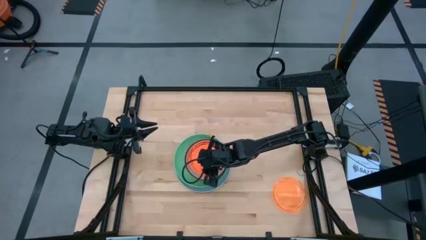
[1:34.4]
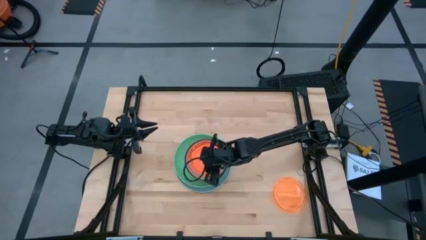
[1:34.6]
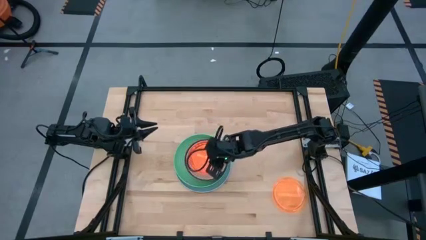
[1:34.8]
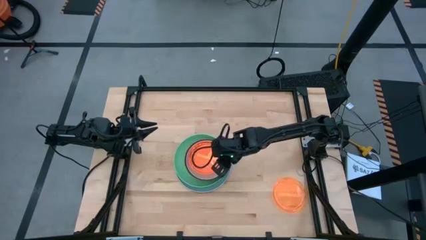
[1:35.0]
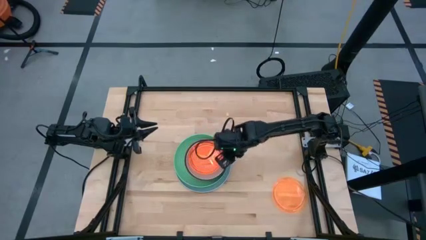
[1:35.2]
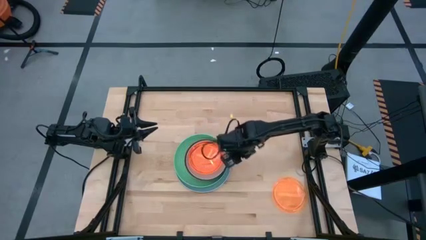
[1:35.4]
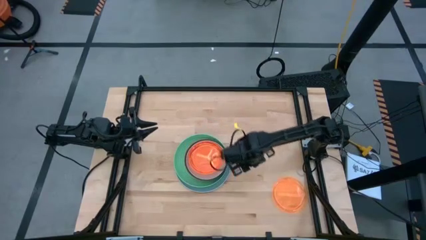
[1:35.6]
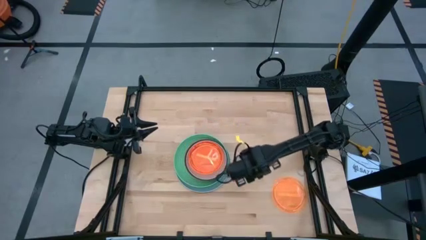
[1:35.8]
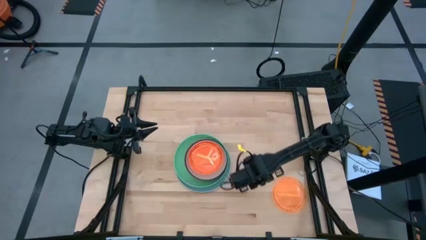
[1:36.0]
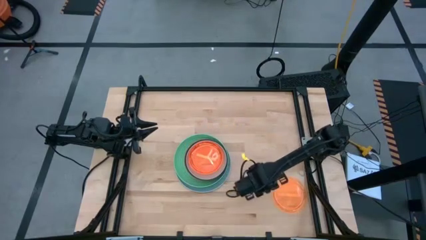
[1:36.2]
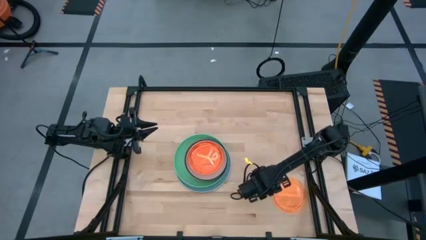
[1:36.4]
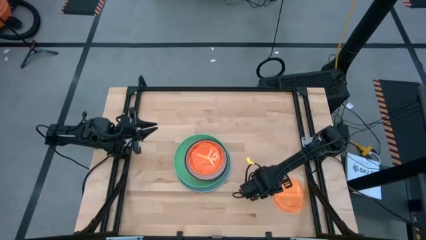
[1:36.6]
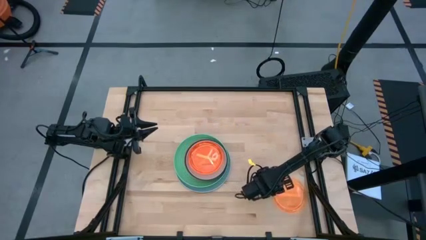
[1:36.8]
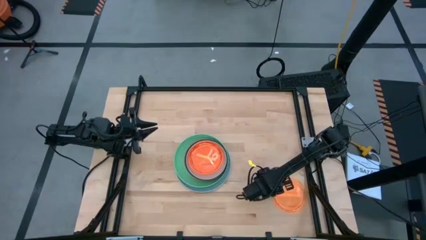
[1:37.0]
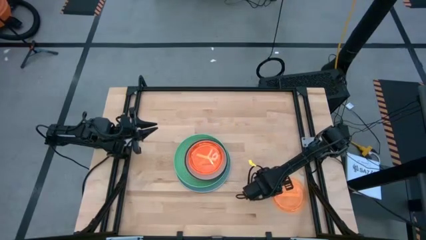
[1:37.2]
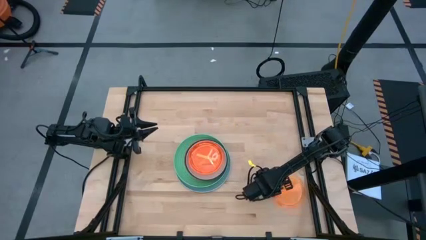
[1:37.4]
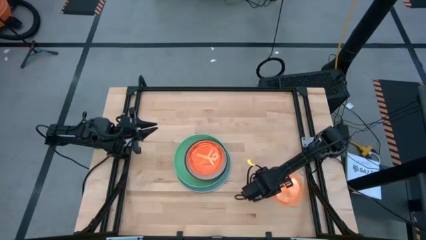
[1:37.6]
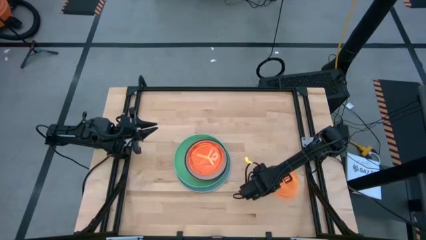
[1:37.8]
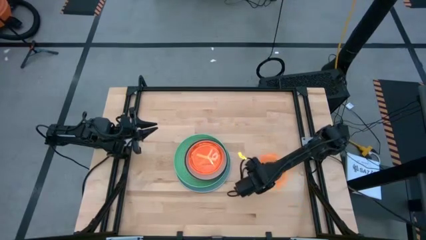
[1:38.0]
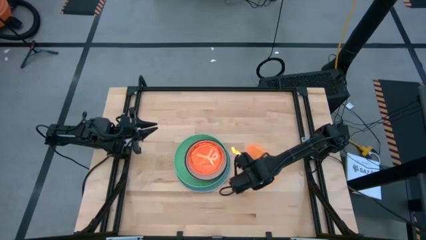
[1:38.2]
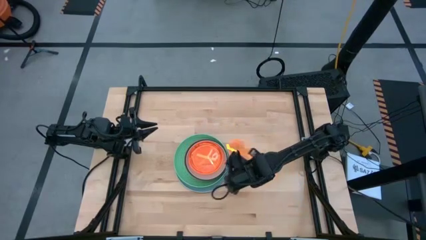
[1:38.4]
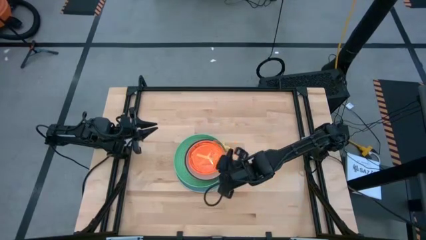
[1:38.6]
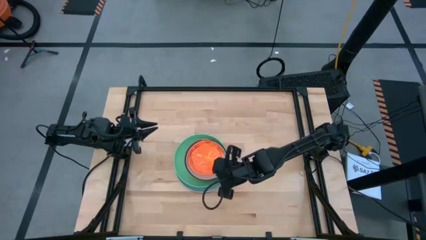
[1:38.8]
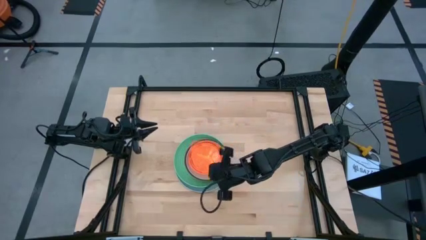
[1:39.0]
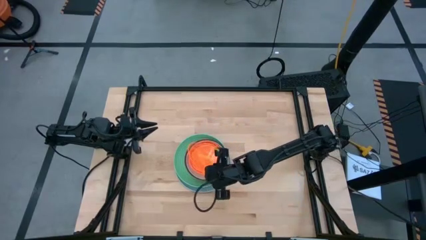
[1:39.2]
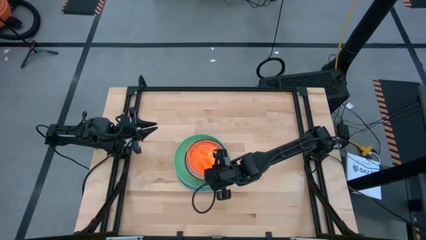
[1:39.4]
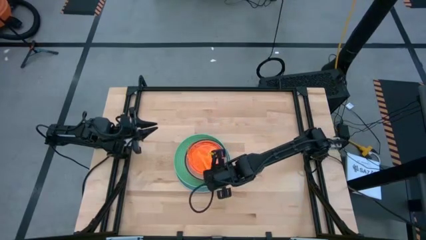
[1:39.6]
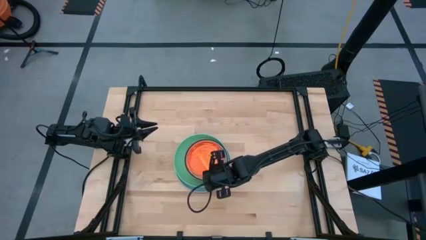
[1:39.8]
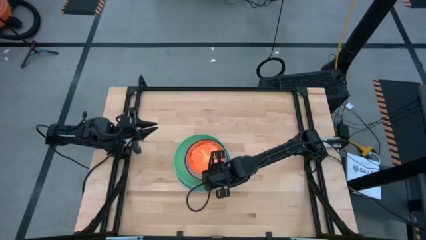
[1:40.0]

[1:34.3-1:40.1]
Task: Stack plastic plates
Stack the transparent orange plate on top of the transparent orange plate

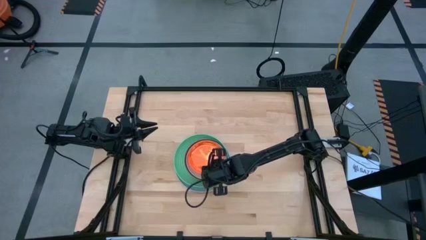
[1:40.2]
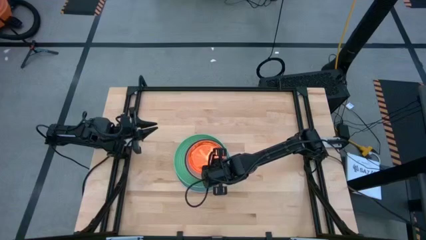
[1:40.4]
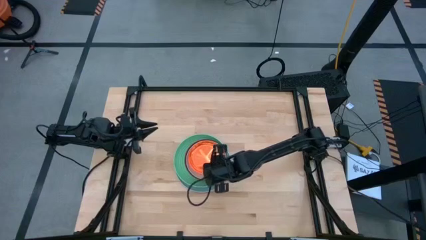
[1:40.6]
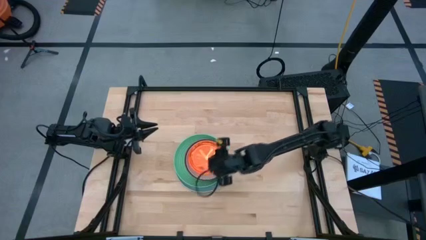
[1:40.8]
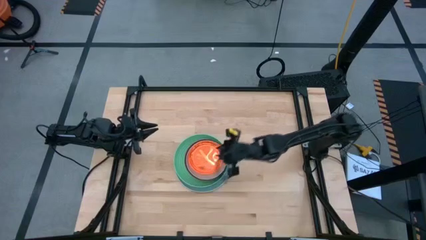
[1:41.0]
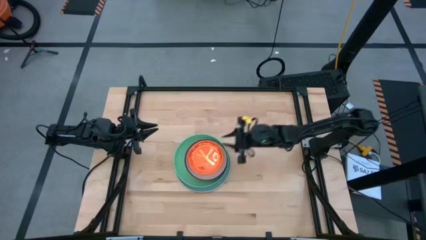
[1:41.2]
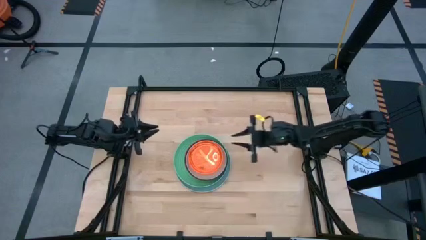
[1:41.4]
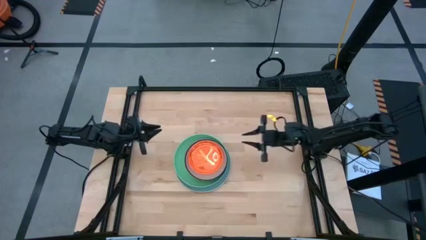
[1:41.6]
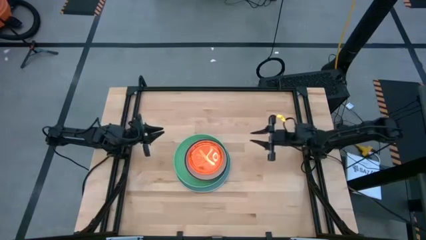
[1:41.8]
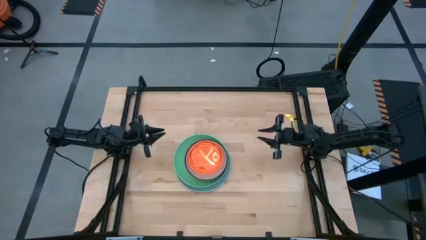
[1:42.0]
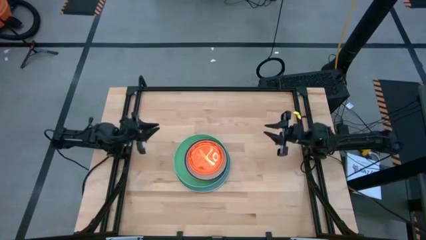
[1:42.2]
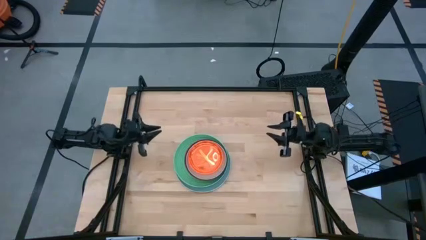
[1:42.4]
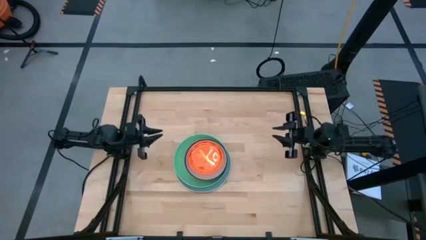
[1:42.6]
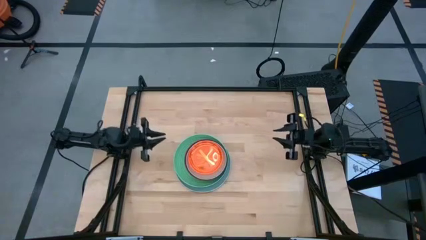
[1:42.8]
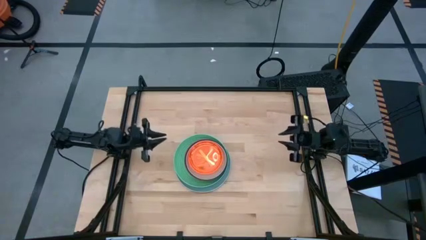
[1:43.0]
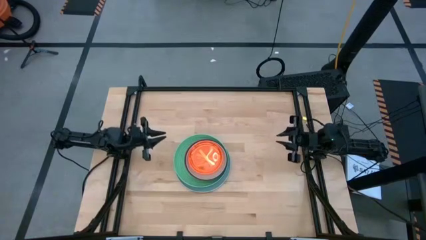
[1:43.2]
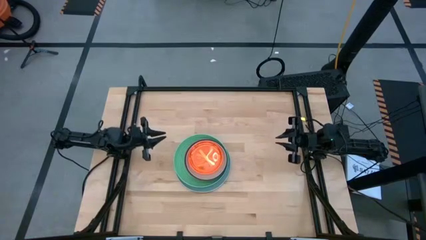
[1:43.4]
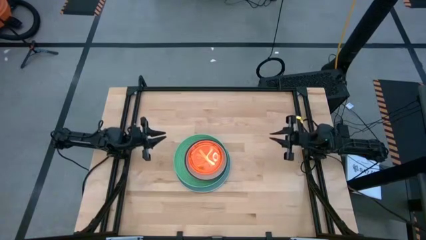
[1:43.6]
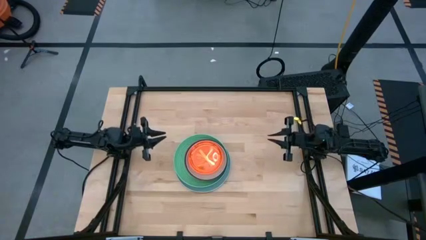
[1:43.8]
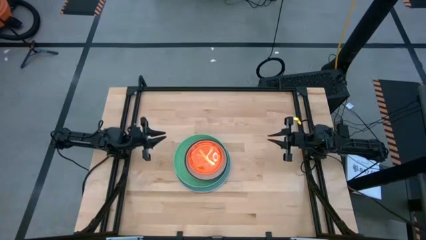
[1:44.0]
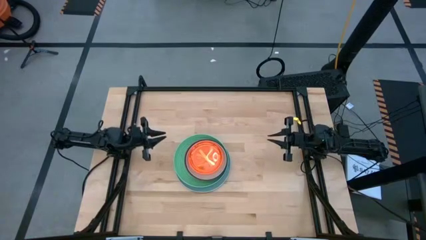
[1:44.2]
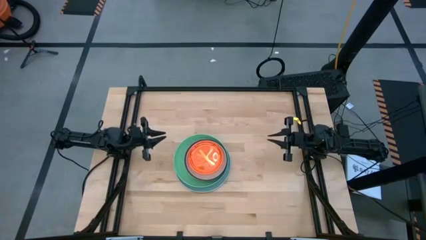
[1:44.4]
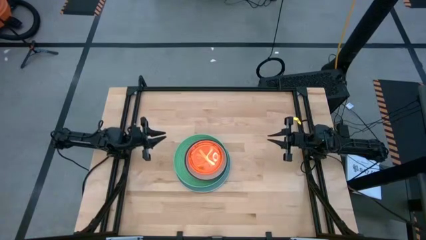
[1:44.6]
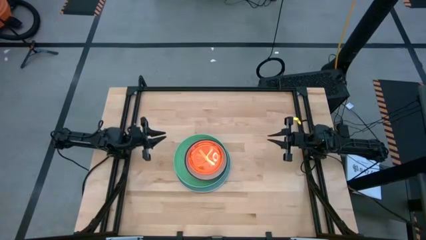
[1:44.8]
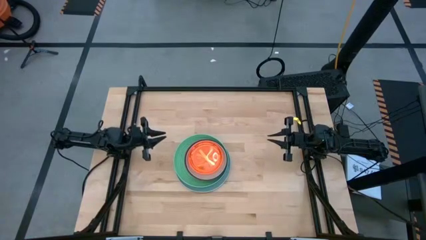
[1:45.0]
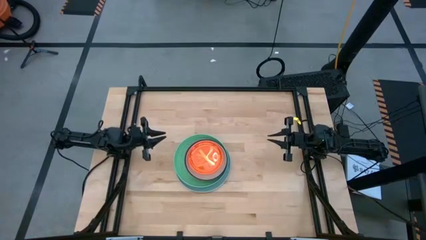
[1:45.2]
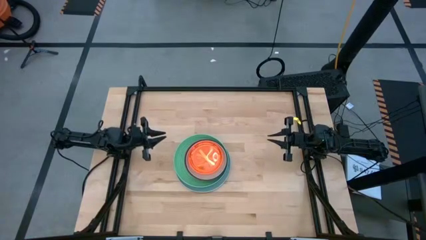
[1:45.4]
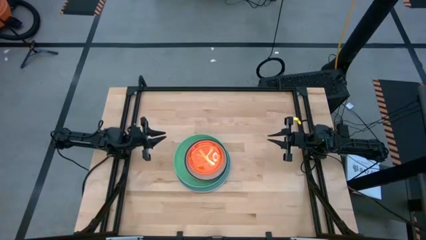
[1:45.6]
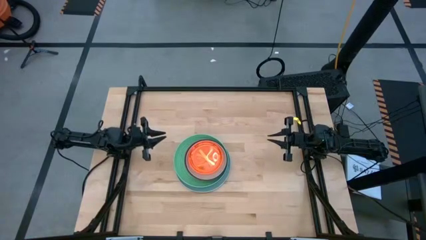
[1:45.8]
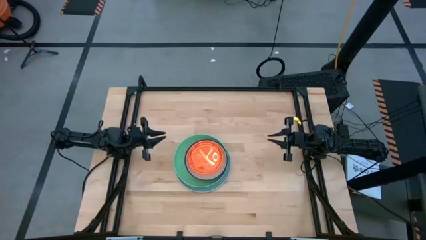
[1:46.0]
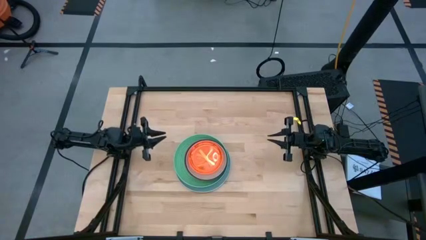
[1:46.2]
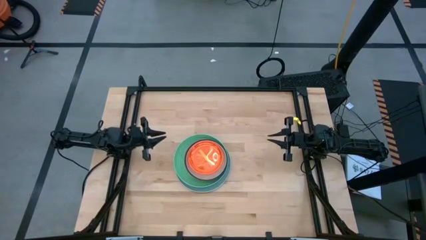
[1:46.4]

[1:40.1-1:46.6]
Return to Home Position
